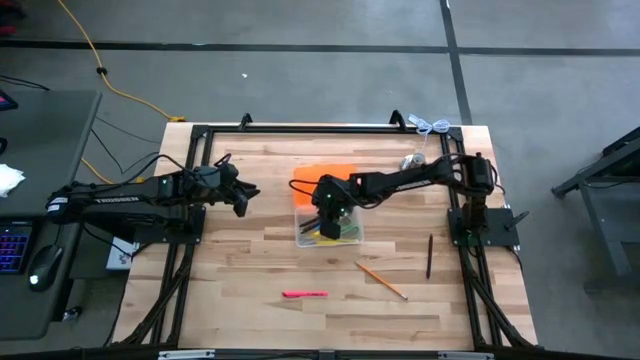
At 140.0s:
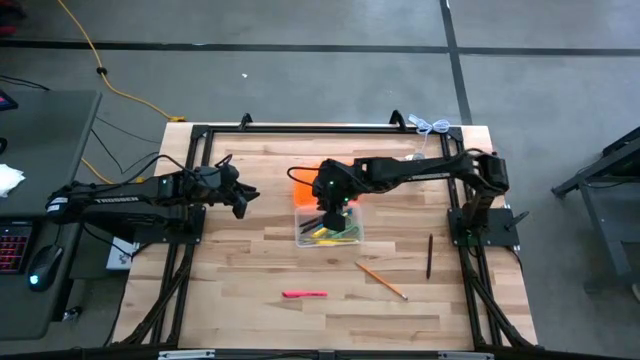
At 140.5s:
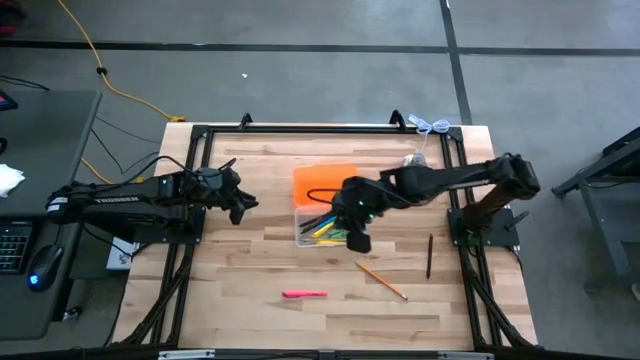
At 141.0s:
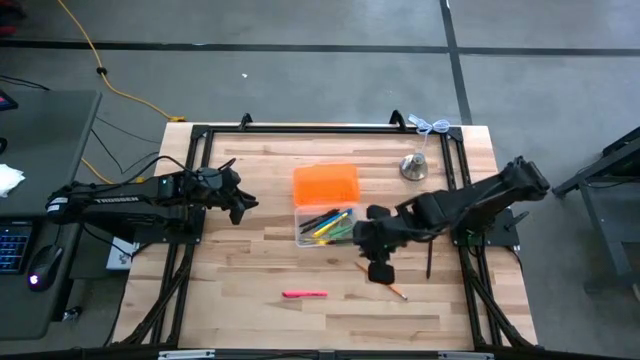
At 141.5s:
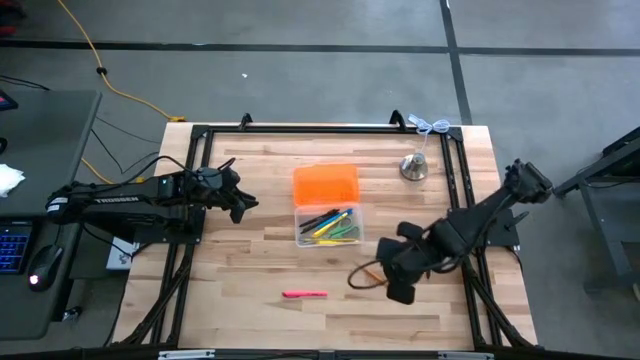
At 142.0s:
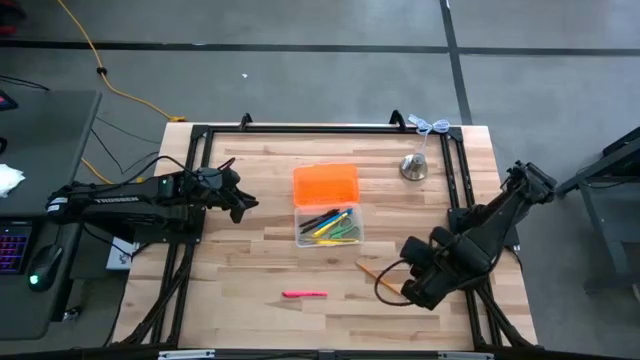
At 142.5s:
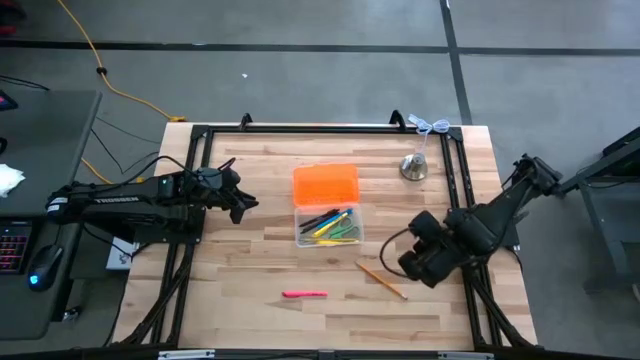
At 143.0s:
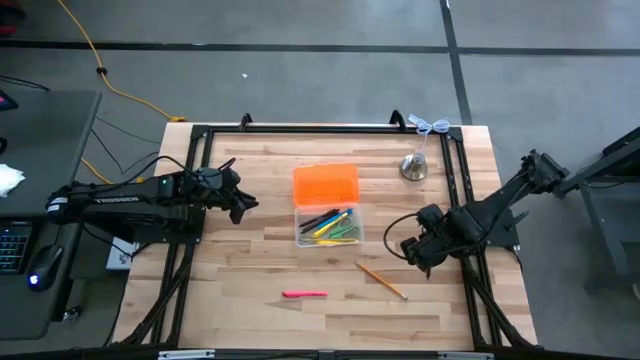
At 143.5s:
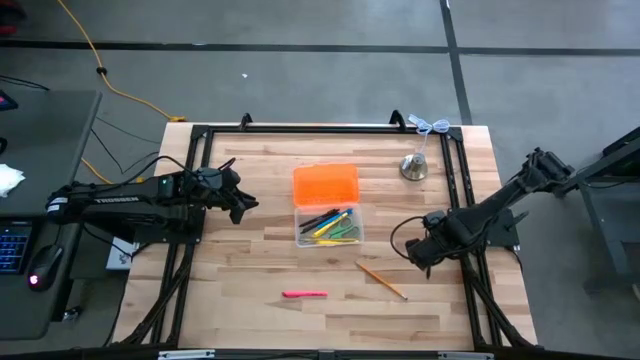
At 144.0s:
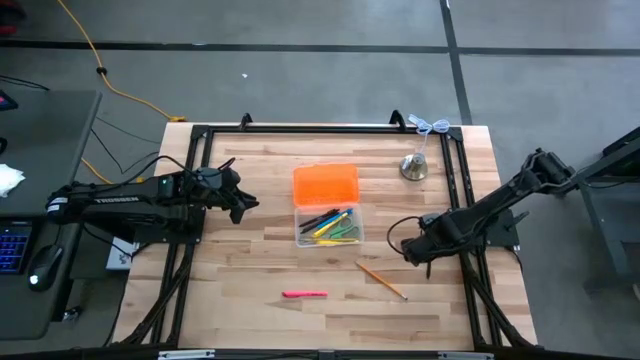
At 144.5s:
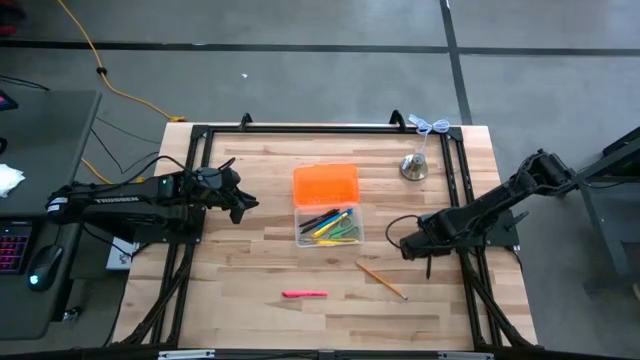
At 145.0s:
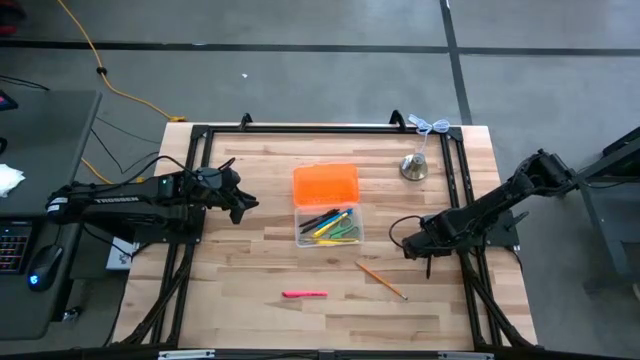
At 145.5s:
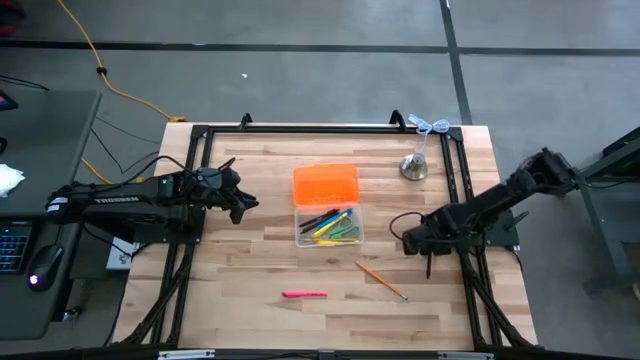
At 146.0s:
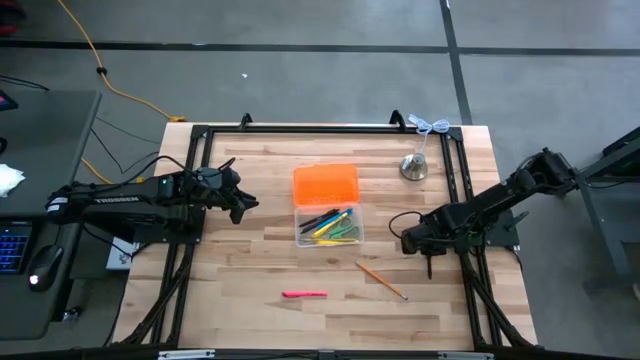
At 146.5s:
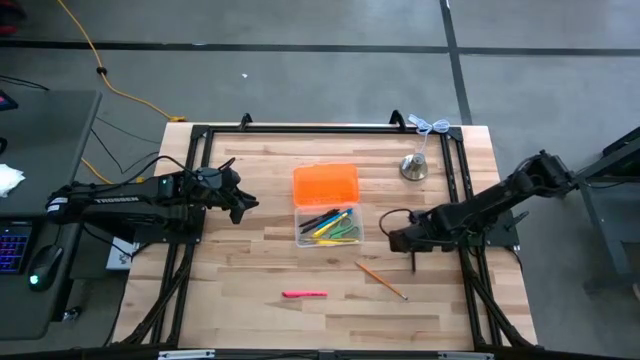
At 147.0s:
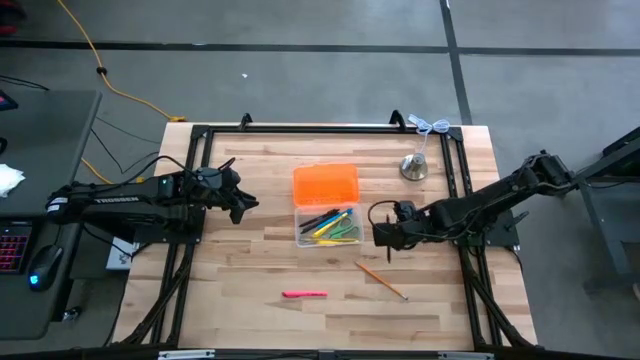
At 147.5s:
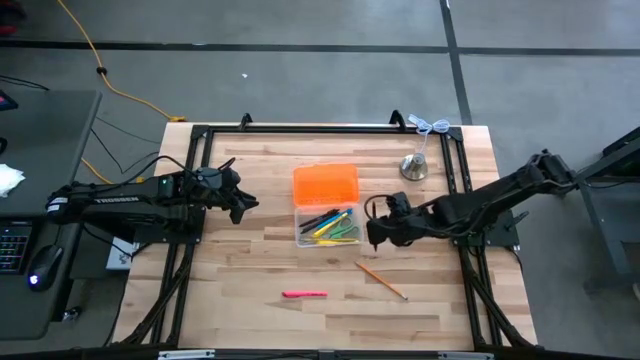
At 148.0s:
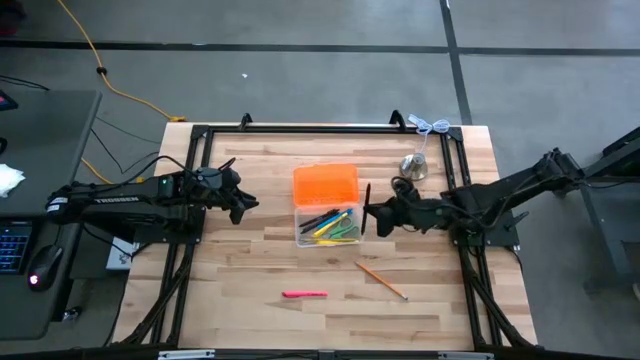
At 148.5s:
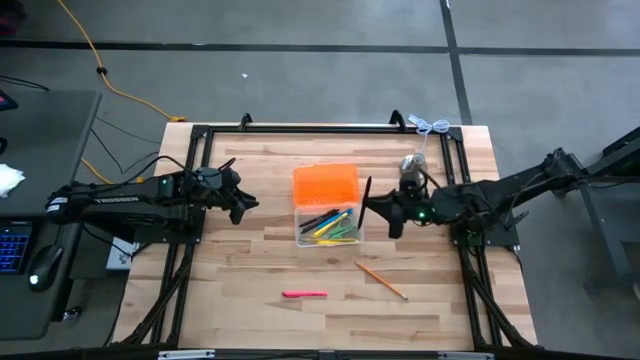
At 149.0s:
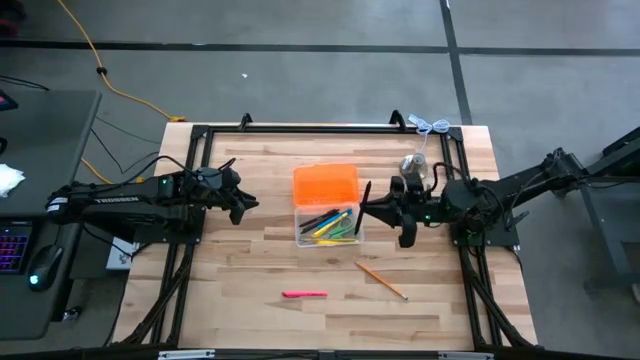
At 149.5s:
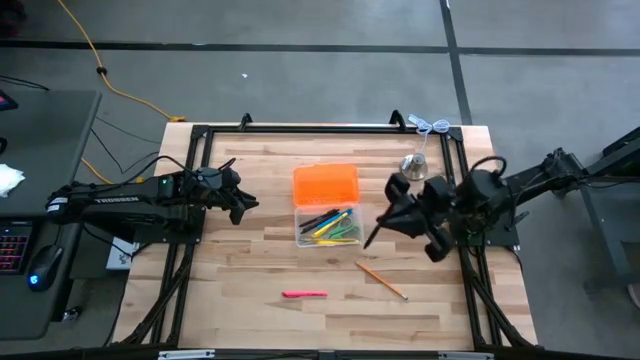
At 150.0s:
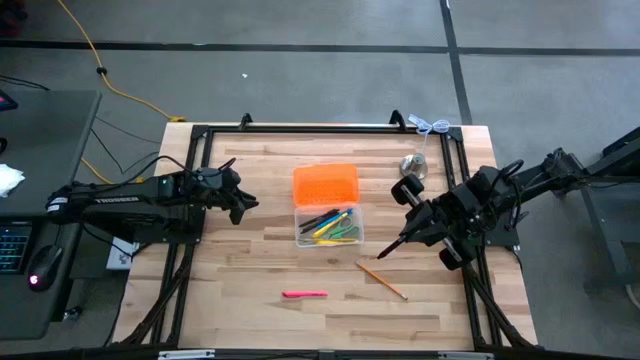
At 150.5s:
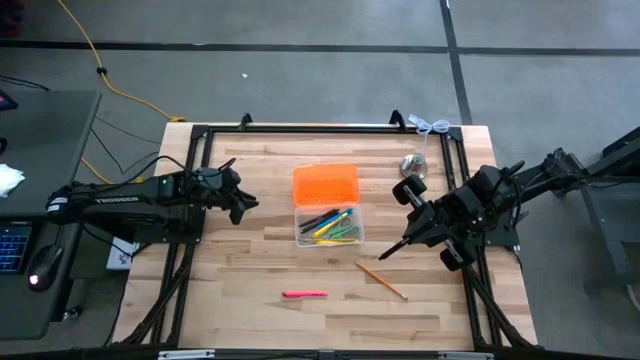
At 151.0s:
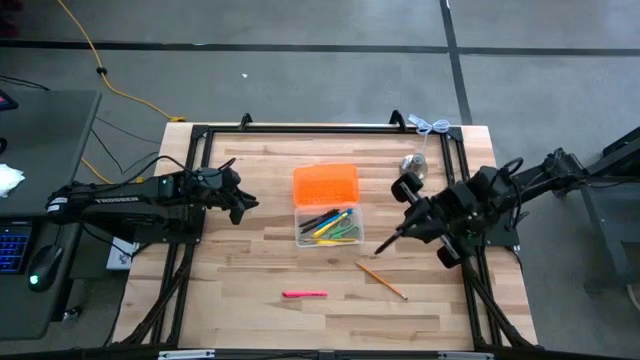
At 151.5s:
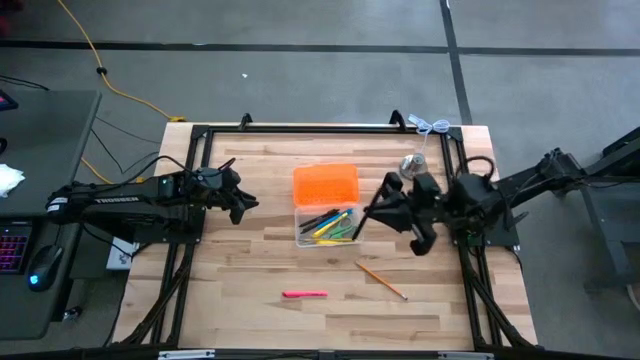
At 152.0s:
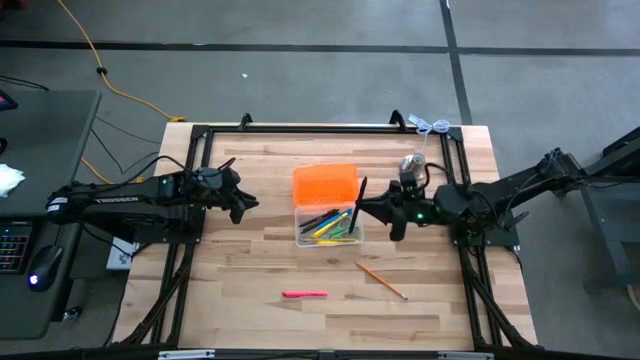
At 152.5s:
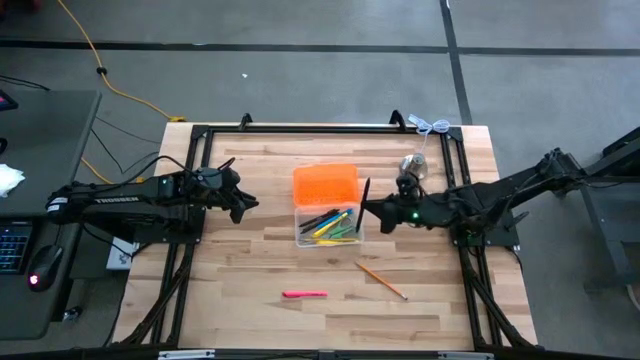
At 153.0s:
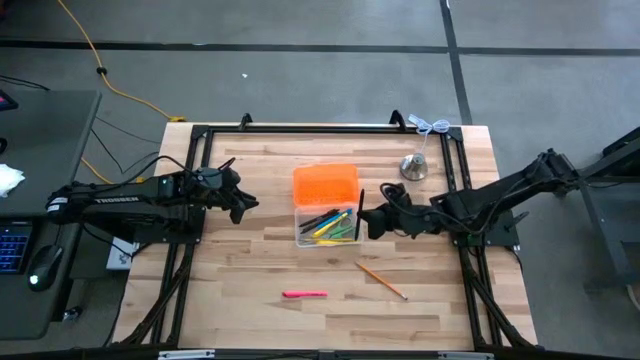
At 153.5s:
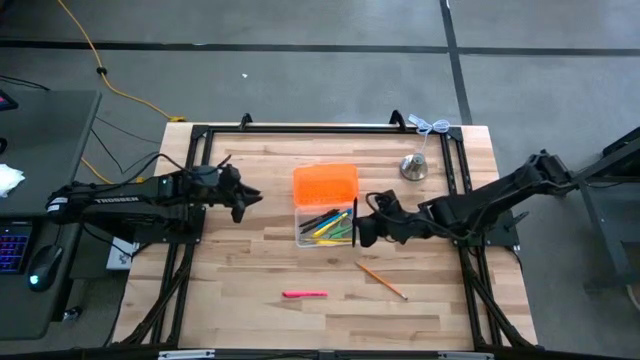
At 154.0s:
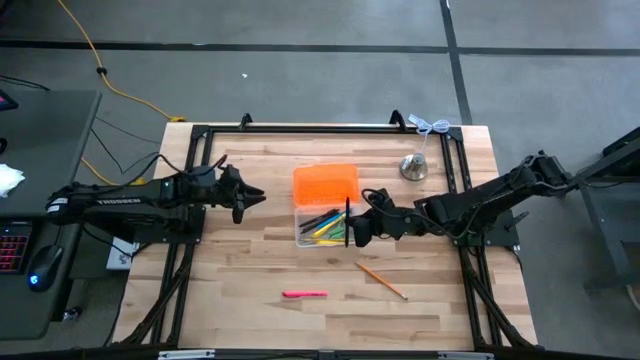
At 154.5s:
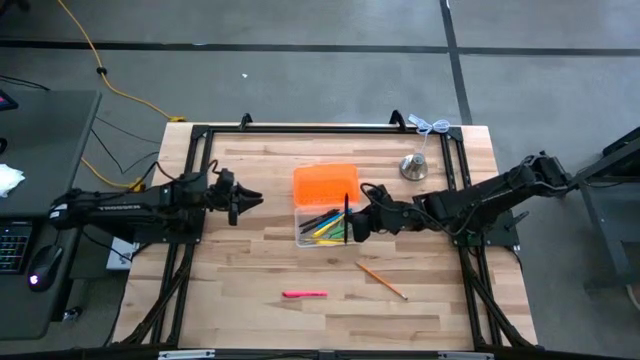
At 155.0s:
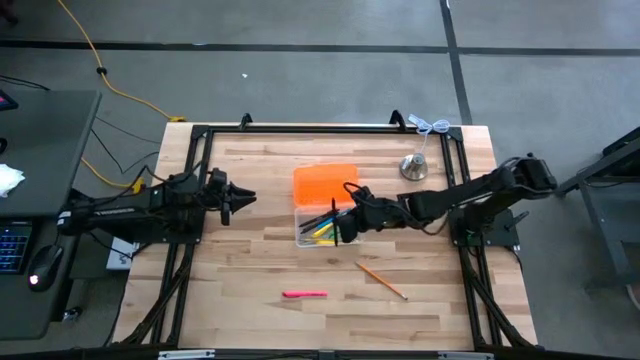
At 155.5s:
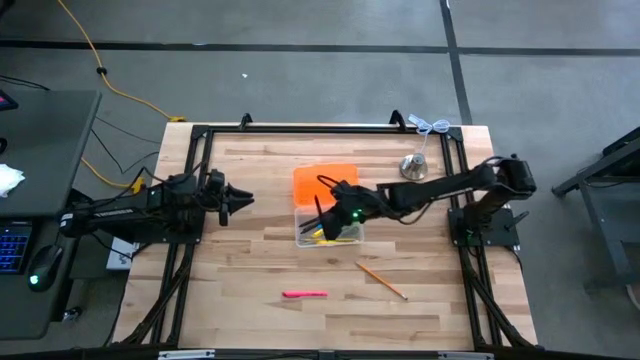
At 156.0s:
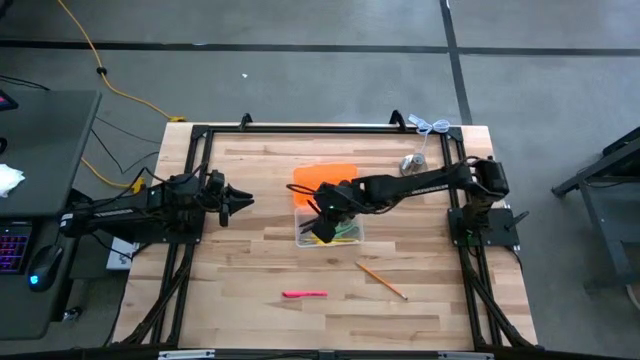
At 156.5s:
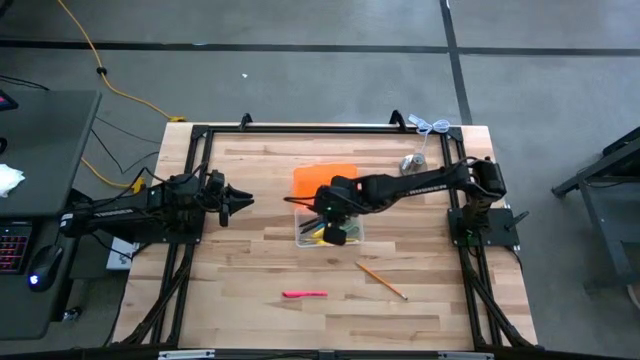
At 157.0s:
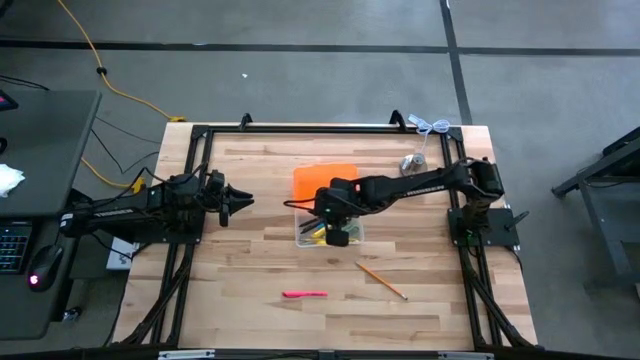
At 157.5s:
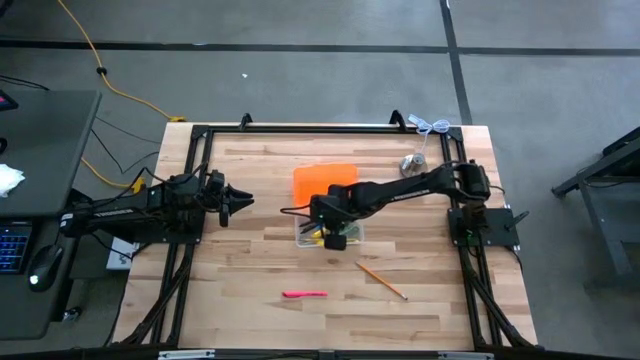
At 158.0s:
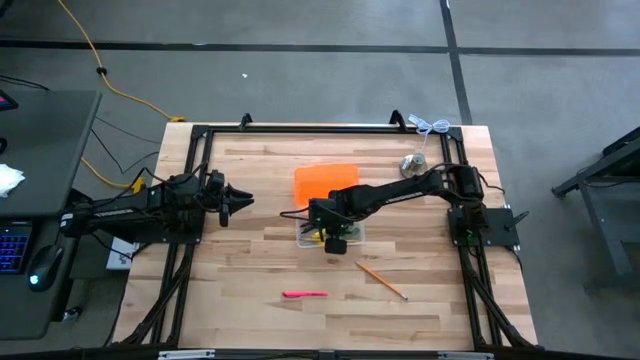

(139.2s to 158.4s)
Task: Pick & place school supplies into a supply box
Put the black pen into the orange supply box

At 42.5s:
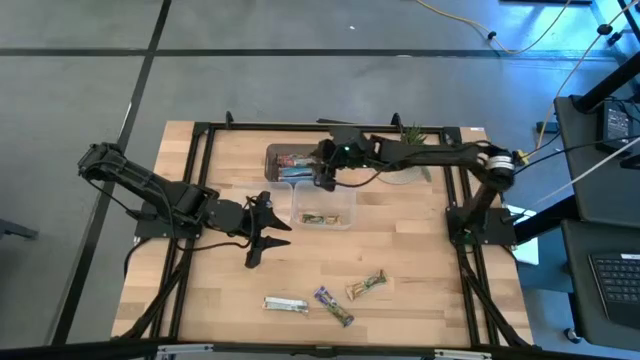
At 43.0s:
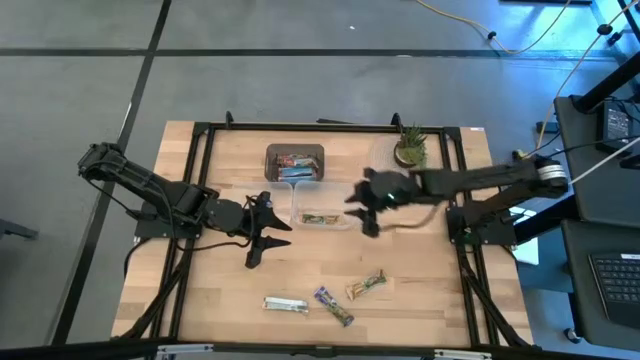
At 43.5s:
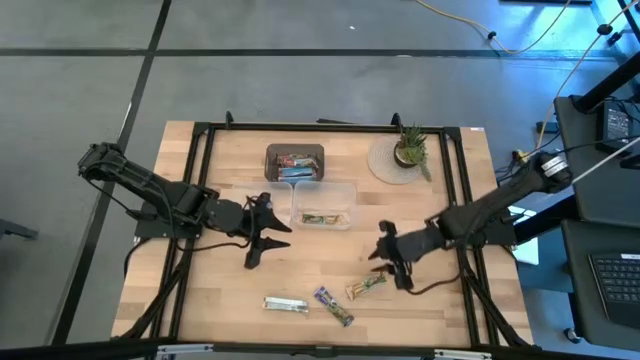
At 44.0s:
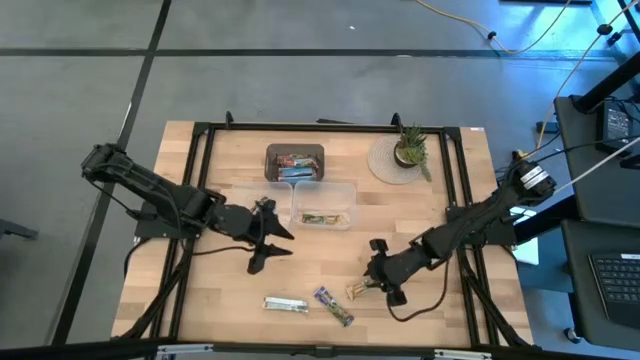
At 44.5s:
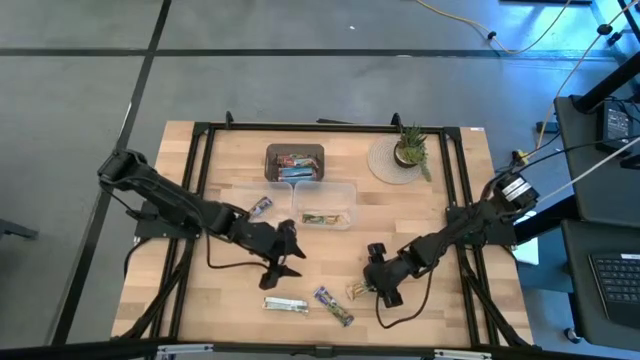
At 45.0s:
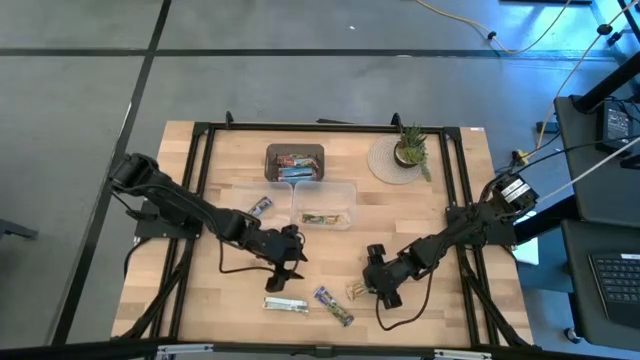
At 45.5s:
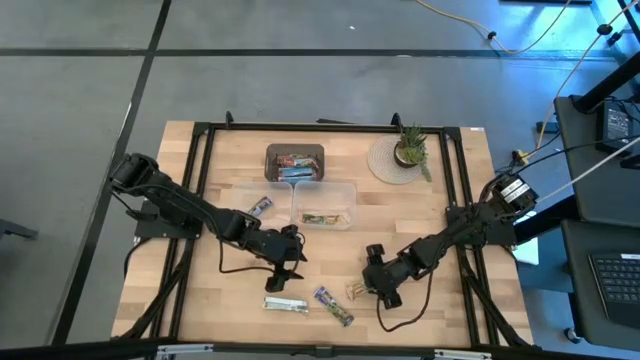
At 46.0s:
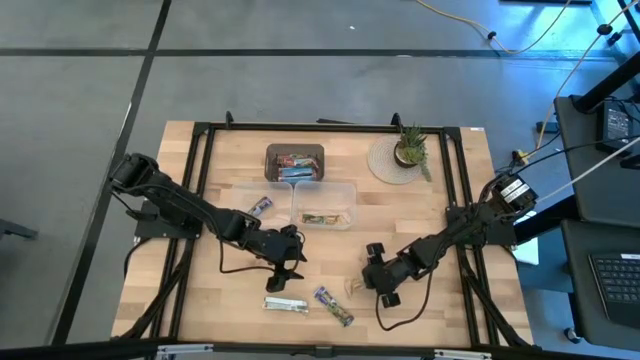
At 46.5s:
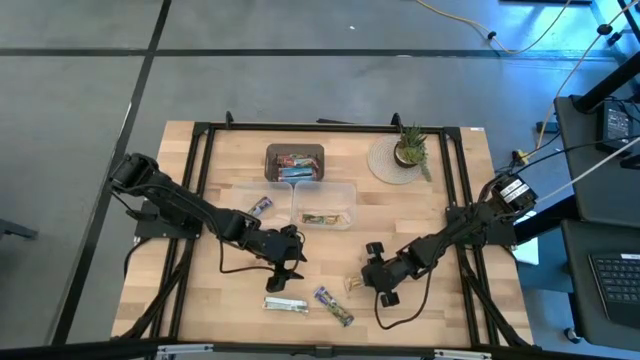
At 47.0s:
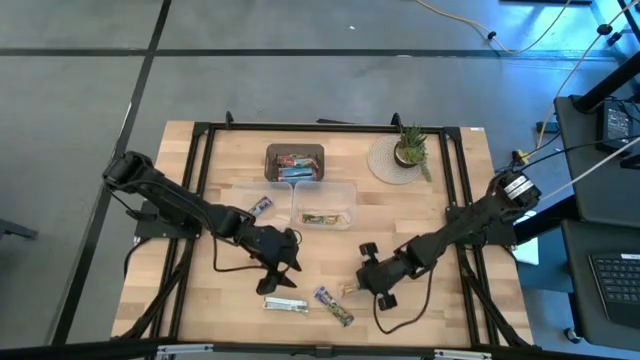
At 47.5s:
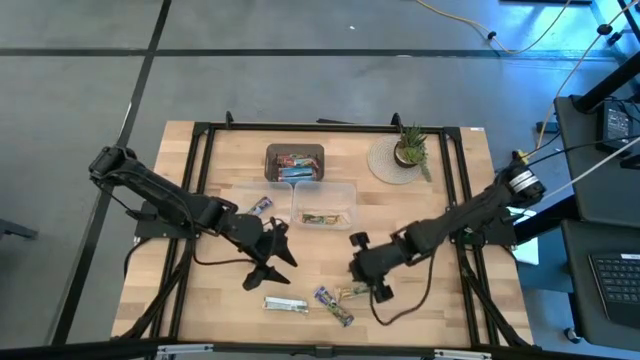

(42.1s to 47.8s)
Task: Pick and place Granola Bars by type
Put the yellow granola bar into the right transparent bin
